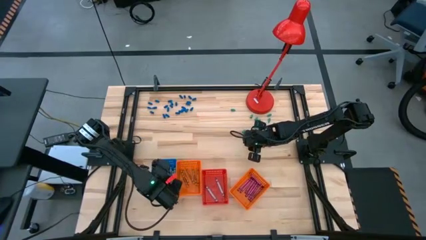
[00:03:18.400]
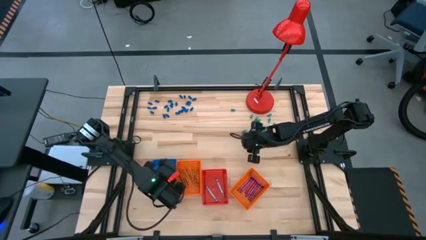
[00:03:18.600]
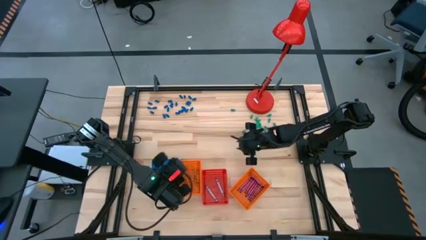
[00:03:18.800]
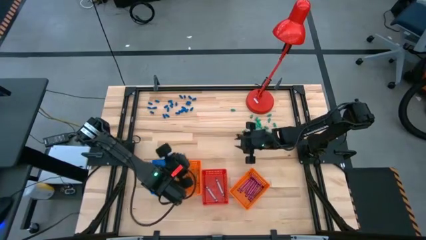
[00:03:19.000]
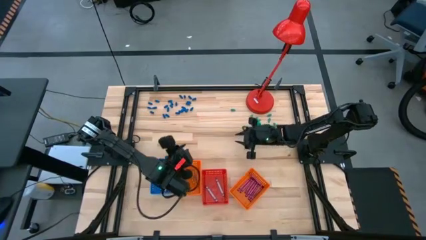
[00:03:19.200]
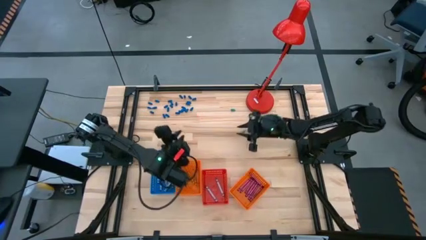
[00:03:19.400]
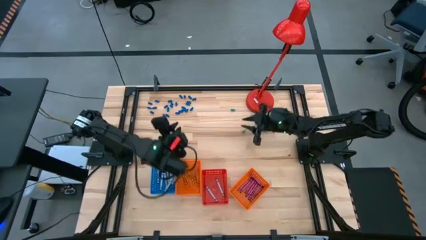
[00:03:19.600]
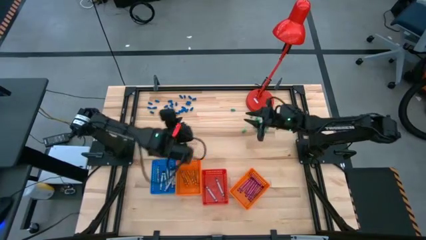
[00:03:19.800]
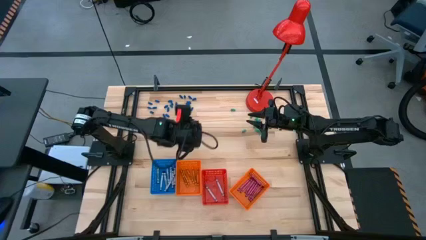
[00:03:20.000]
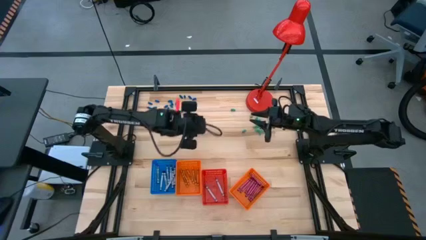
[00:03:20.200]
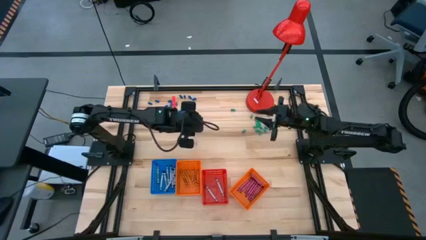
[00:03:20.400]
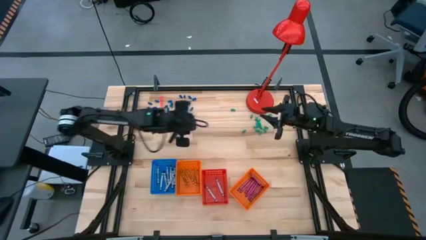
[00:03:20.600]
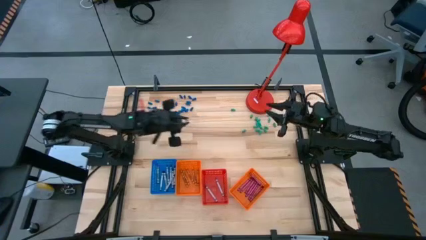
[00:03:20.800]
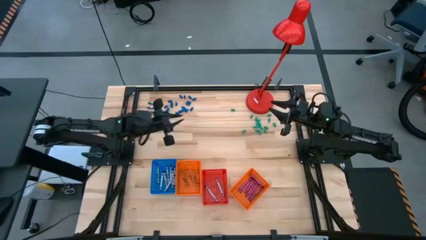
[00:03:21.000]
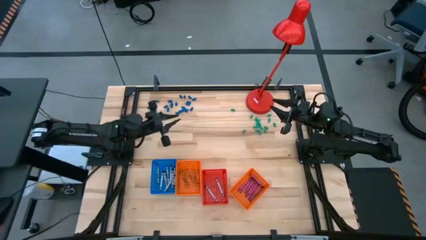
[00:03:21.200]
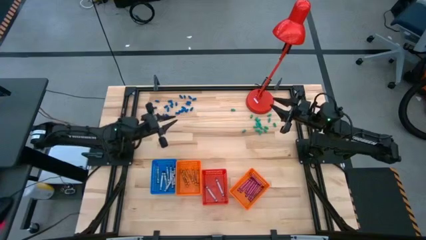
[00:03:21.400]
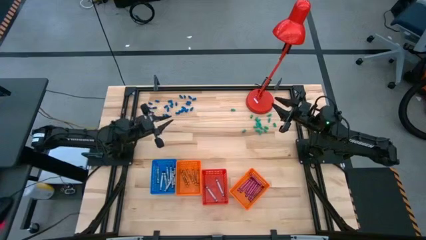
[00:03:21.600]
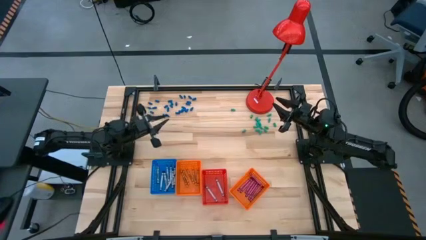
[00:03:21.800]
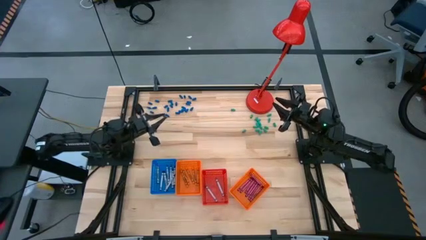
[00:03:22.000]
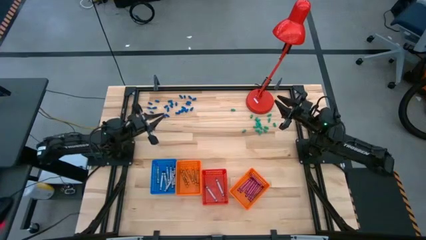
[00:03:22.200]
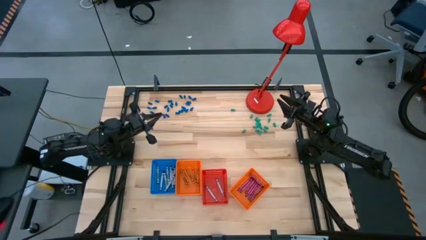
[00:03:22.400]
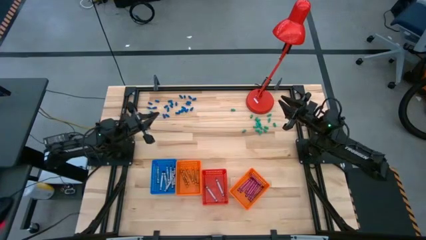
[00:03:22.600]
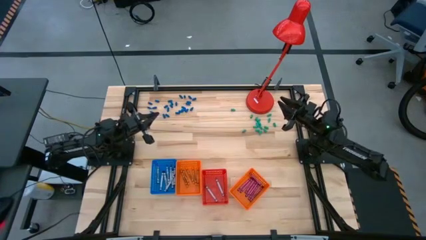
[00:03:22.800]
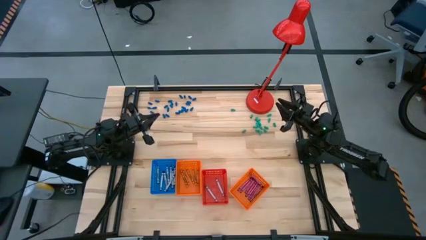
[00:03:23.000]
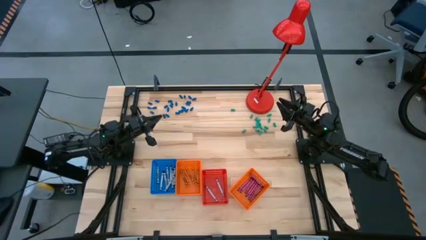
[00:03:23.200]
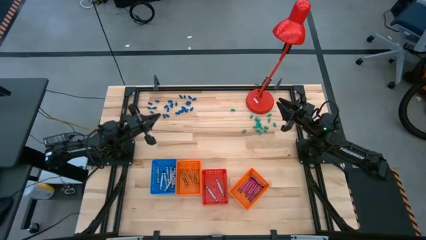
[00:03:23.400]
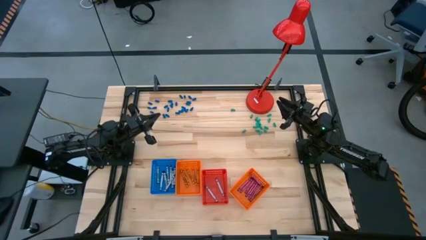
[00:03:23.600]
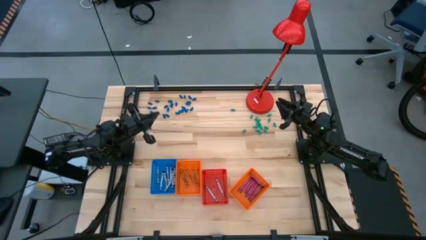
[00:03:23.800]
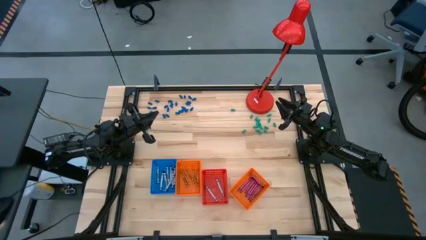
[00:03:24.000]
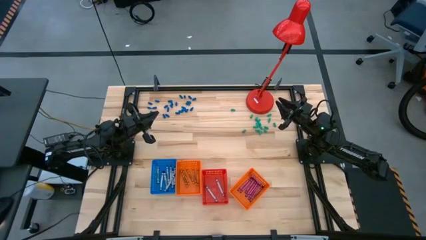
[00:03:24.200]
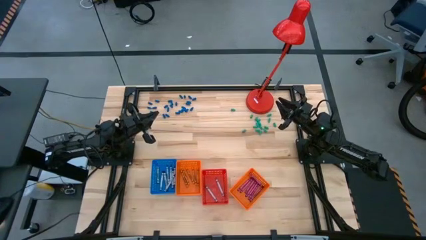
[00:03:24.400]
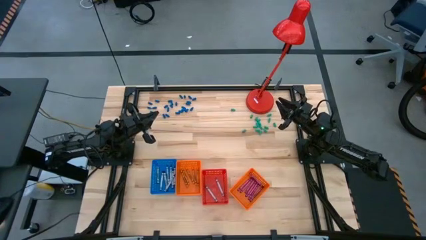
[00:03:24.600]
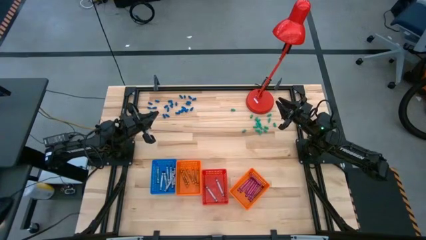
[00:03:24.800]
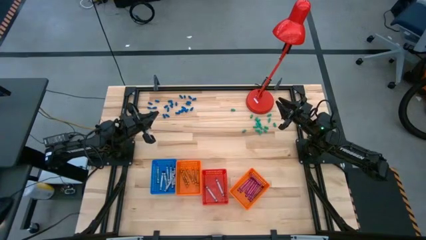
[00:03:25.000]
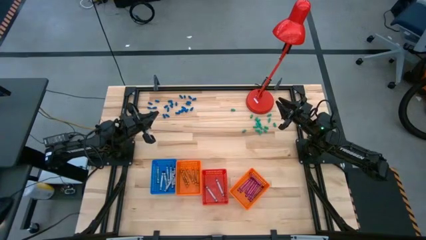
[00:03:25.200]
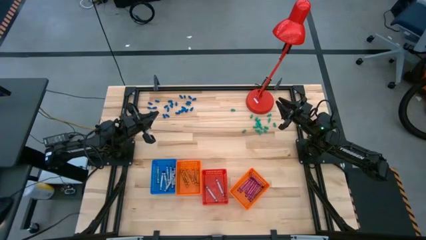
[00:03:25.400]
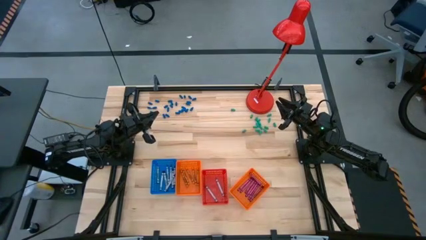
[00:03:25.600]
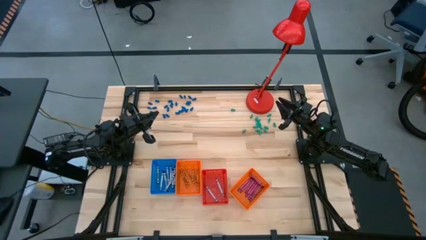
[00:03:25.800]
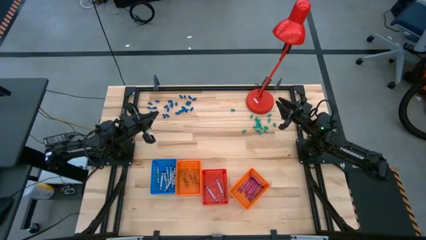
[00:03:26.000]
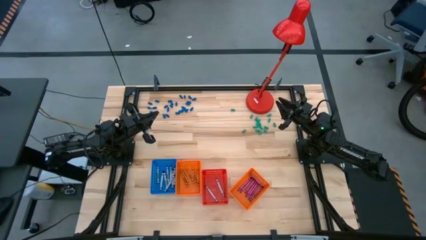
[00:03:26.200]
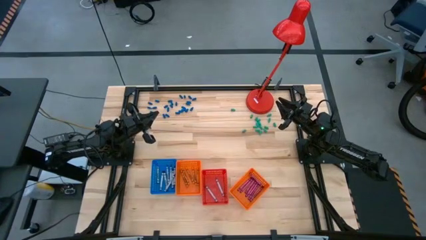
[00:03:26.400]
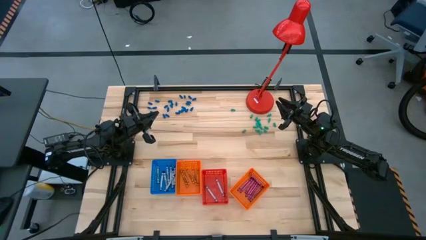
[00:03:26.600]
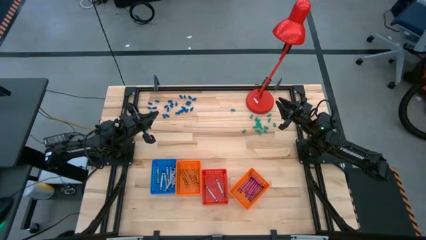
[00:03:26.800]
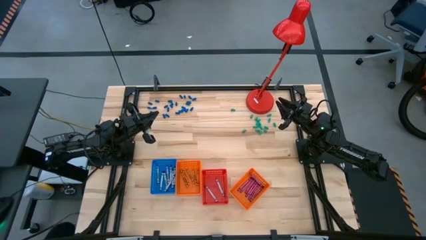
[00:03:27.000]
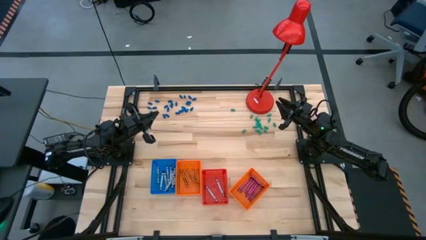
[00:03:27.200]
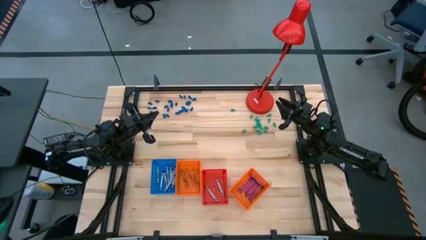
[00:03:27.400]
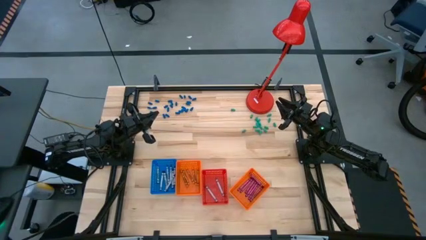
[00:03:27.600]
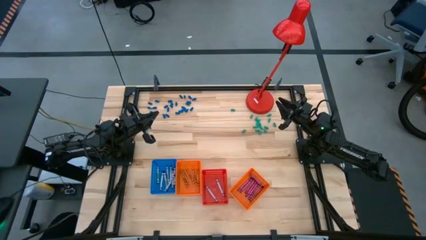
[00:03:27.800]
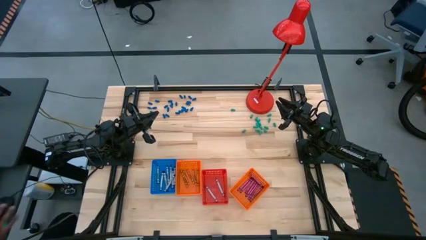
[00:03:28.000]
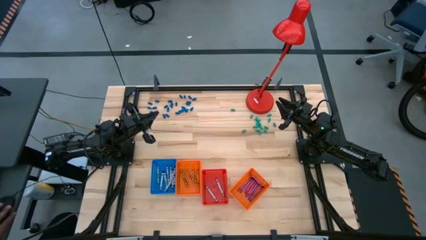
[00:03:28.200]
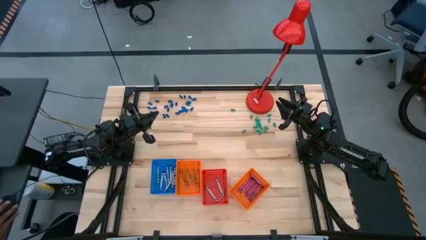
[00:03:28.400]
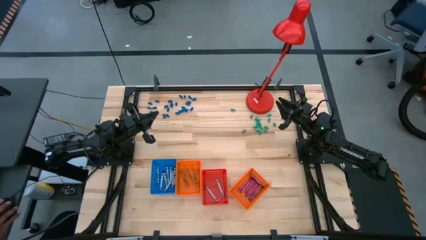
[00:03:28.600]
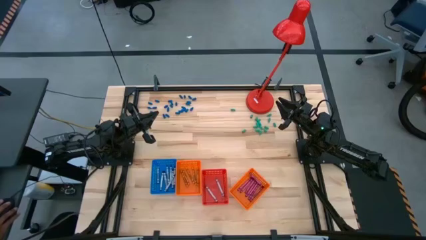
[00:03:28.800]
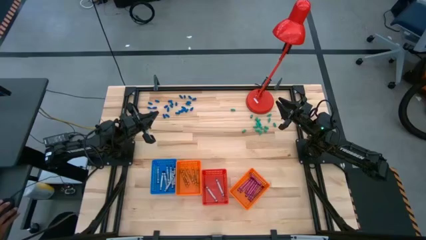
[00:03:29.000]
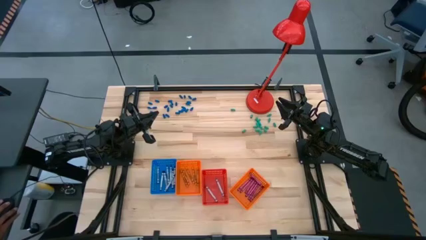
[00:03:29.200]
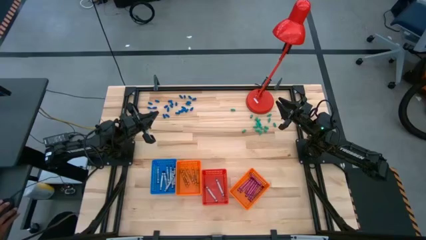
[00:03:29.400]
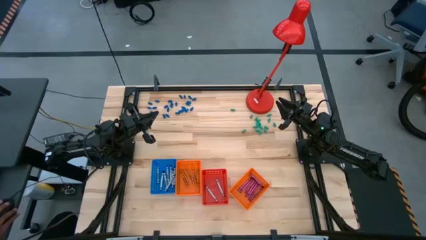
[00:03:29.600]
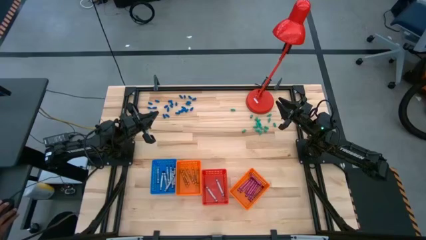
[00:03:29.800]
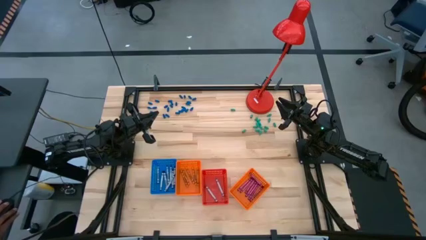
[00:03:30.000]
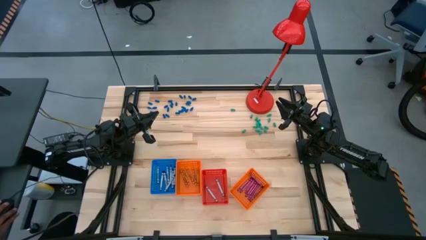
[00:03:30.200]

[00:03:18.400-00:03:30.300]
Task: Sort crayons
Return to Home Position

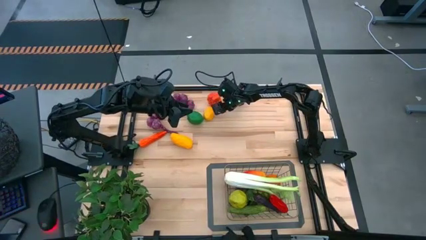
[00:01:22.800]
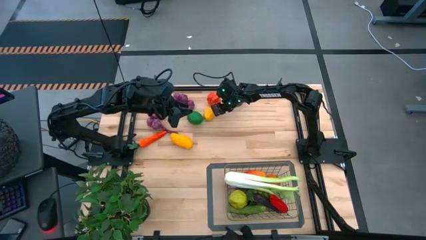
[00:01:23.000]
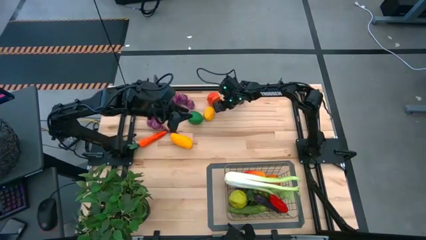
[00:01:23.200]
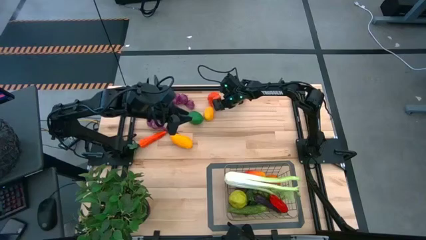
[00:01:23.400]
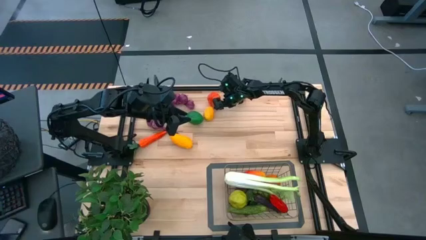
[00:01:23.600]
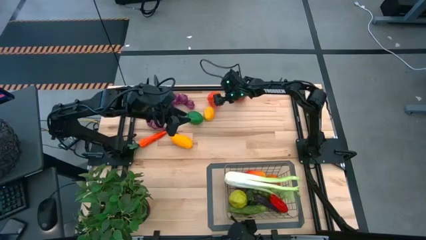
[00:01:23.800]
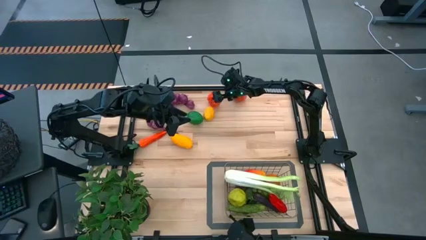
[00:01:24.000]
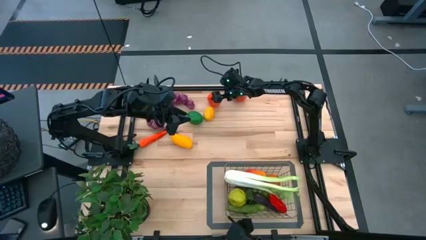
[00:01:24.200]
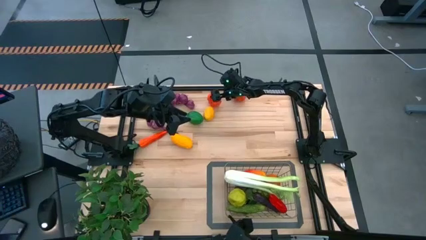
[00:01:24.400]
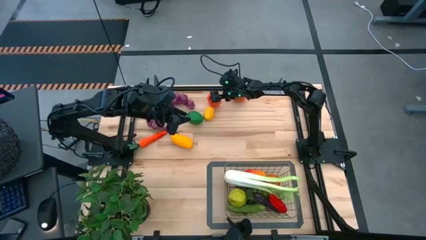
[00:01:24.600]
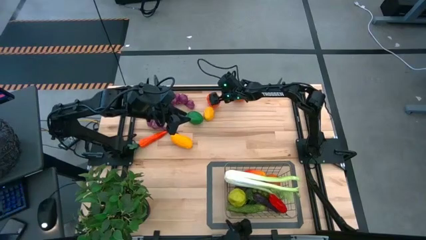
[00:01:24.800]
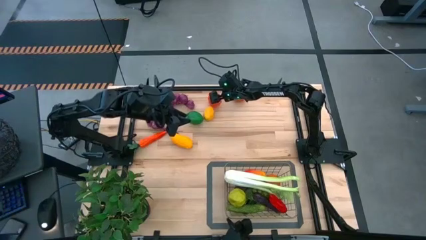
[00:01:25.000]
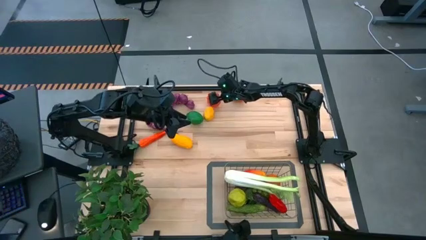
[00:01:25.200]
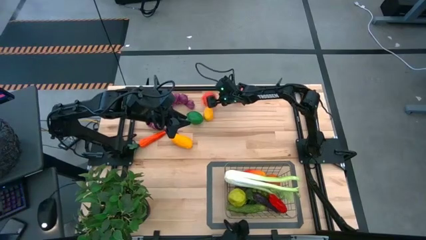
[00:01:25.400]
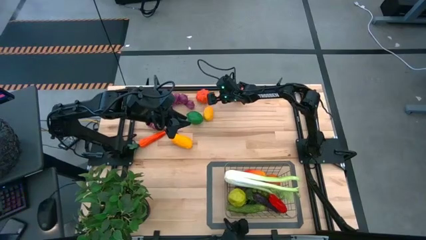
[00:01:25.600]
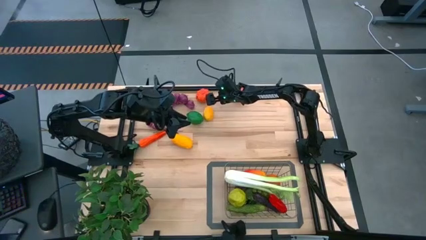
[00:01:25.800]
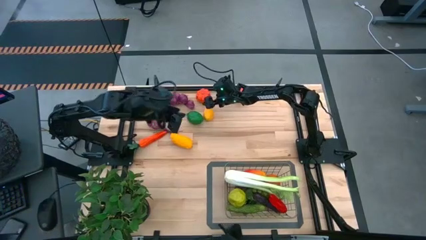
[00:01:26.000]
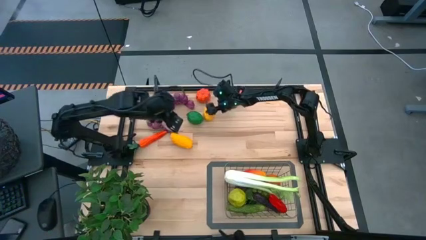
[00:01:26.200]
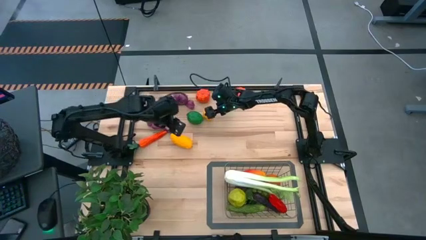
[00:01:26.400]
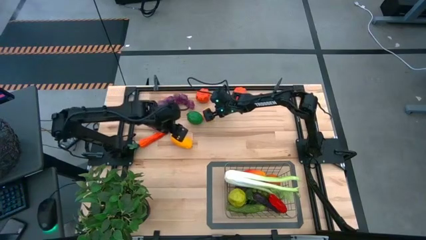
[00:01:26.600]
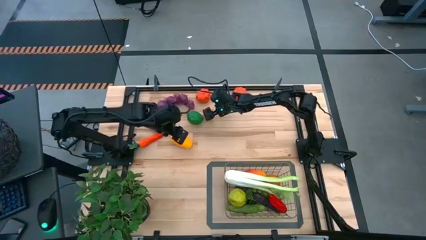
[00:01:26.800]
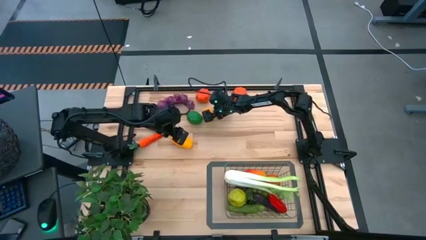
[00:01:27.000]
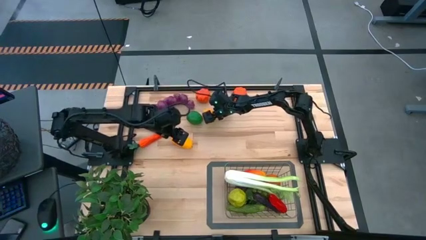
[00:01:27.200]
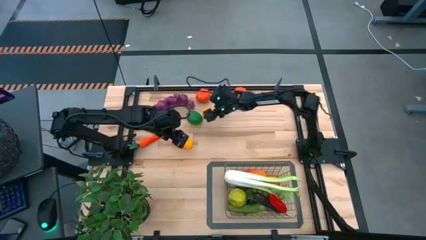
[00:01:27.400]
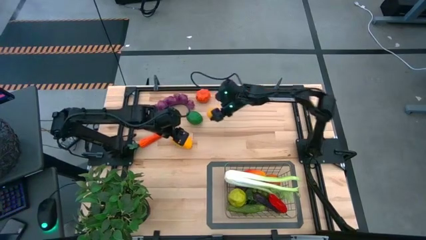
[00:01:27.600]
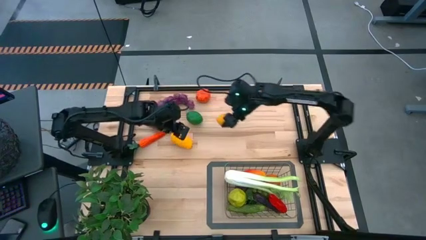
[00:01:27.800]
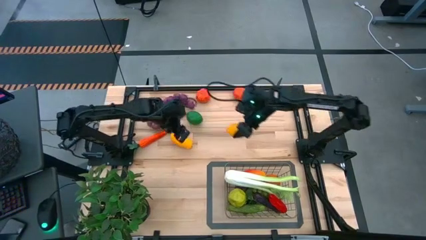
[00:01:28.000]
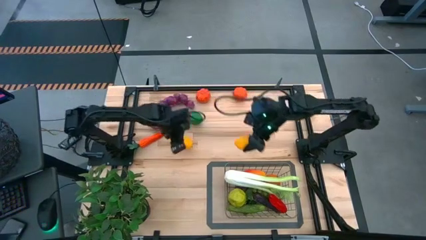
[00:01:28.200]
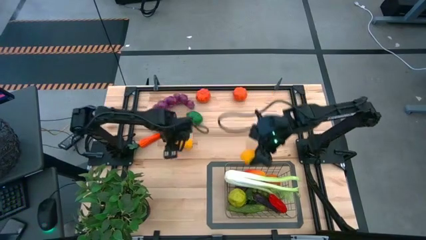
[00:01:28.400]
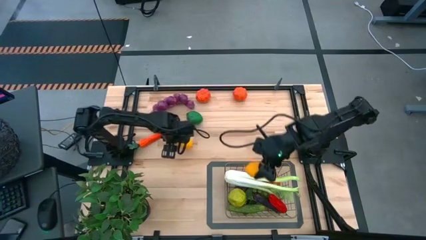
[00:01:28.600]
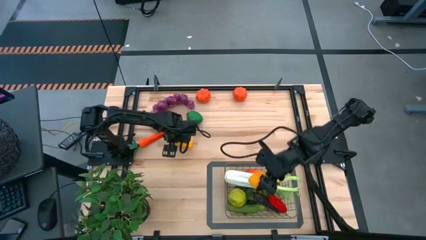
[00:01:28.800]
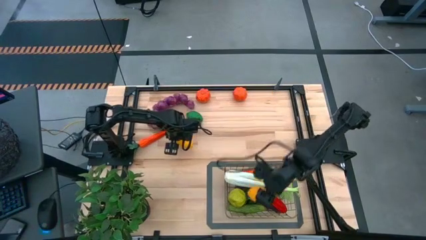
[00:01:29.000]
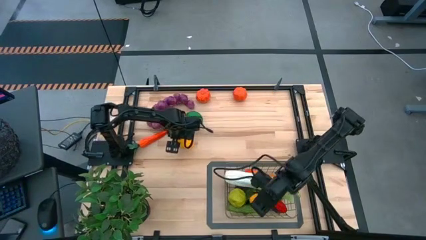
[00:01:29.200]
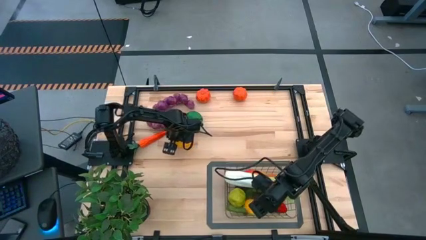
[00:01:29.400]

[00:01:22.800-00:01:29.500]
Task: Build produce basket
Put the lemon into the wire basket
